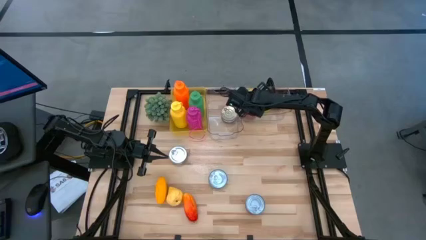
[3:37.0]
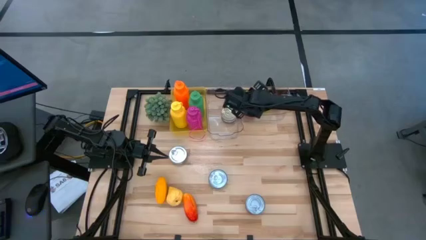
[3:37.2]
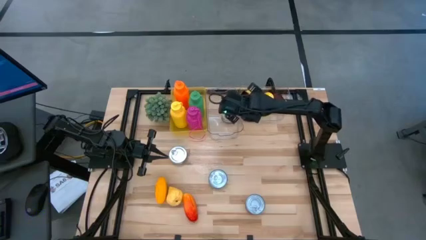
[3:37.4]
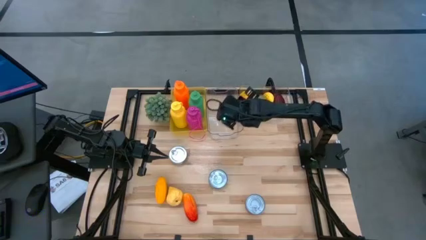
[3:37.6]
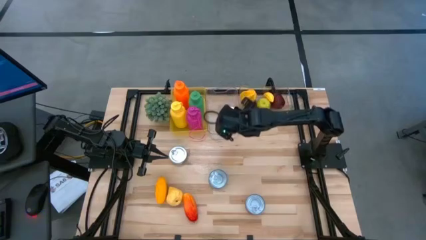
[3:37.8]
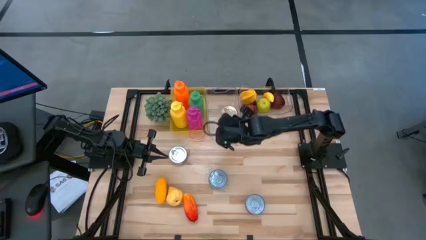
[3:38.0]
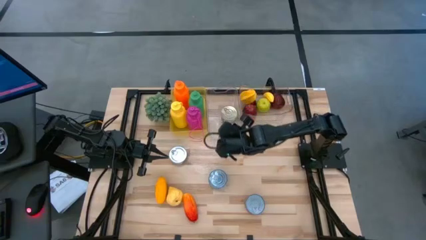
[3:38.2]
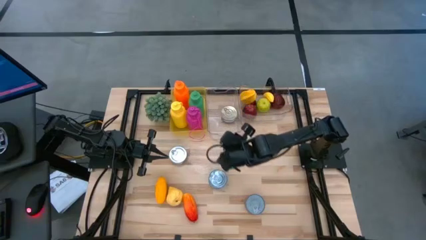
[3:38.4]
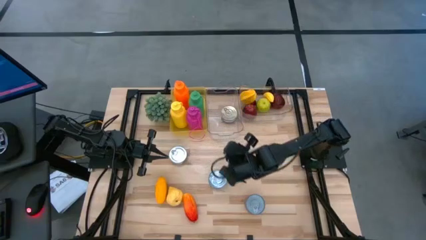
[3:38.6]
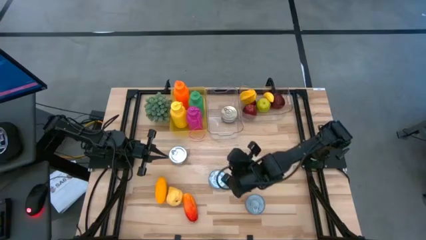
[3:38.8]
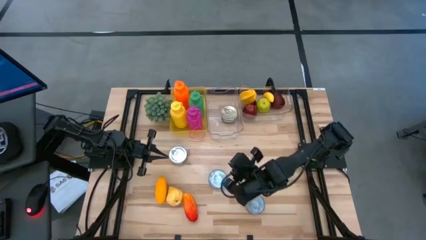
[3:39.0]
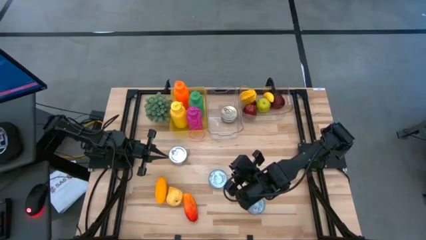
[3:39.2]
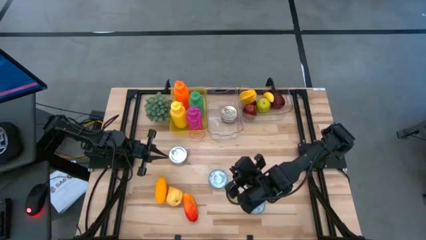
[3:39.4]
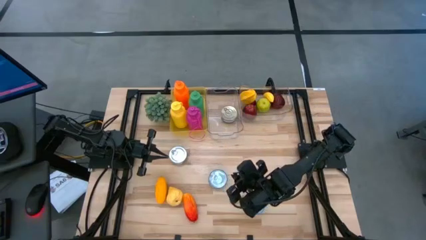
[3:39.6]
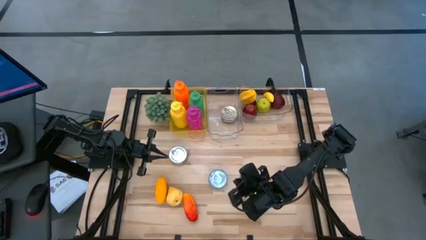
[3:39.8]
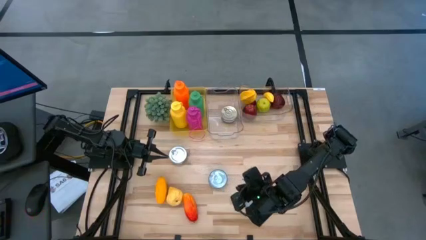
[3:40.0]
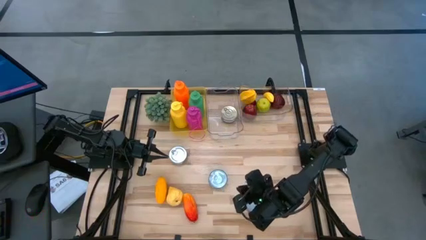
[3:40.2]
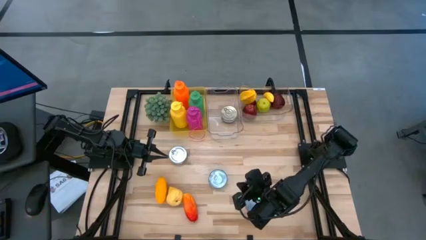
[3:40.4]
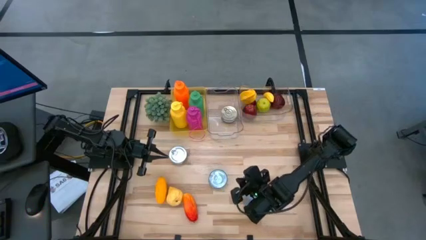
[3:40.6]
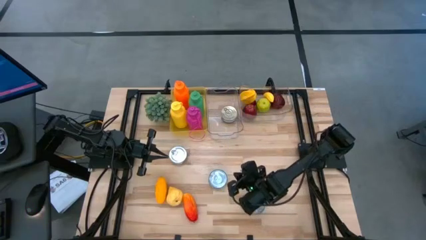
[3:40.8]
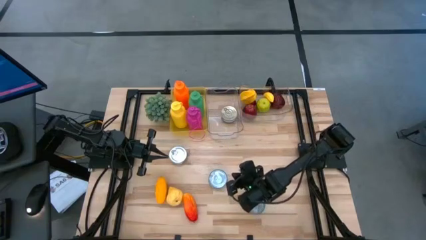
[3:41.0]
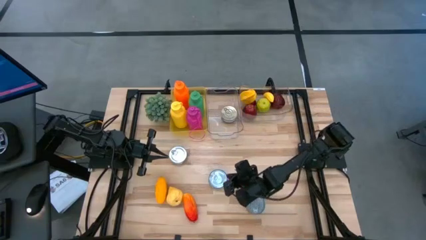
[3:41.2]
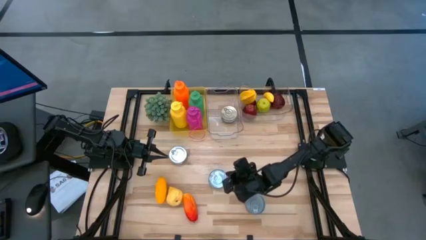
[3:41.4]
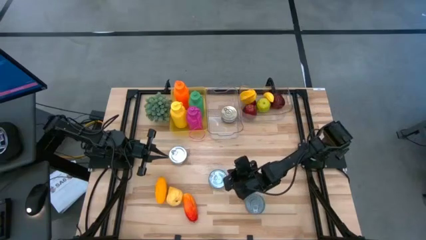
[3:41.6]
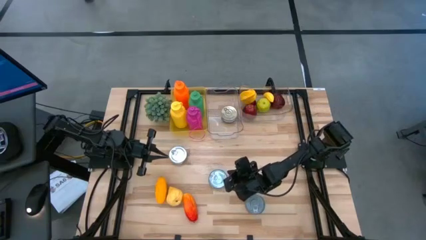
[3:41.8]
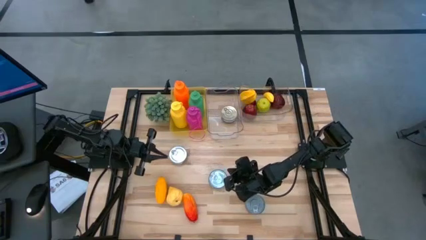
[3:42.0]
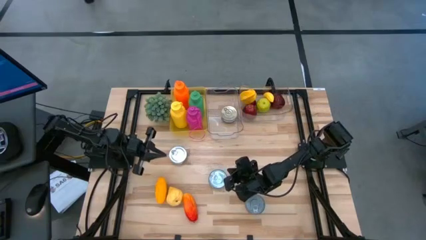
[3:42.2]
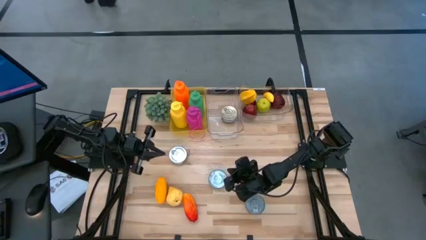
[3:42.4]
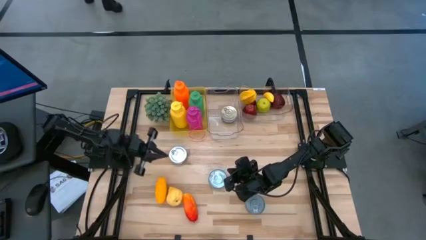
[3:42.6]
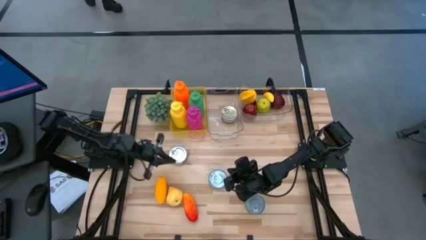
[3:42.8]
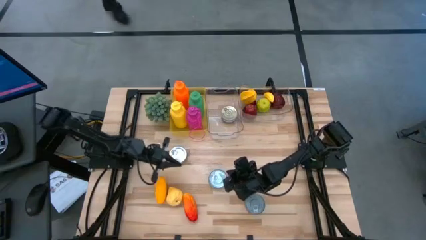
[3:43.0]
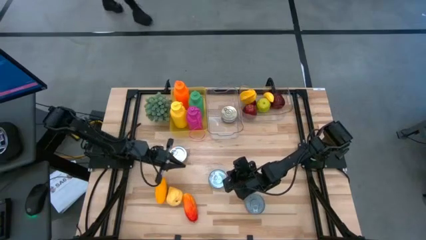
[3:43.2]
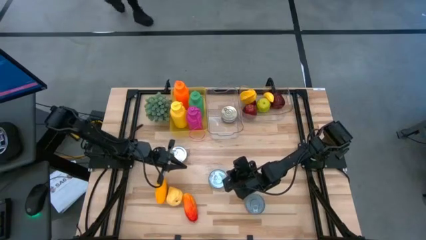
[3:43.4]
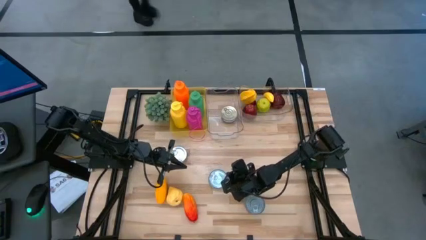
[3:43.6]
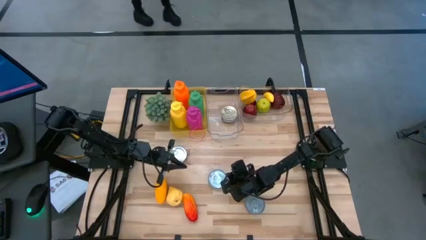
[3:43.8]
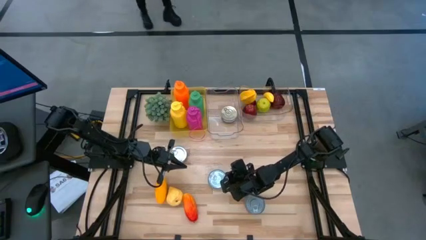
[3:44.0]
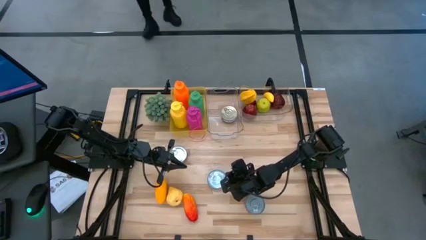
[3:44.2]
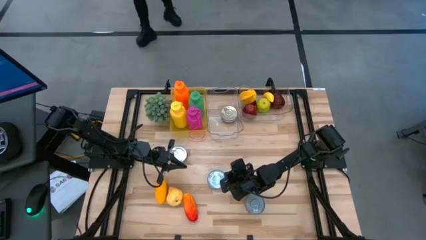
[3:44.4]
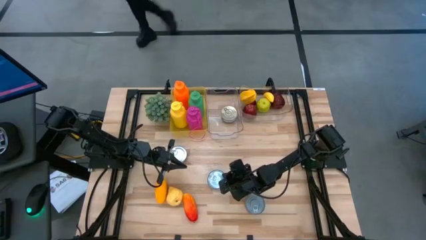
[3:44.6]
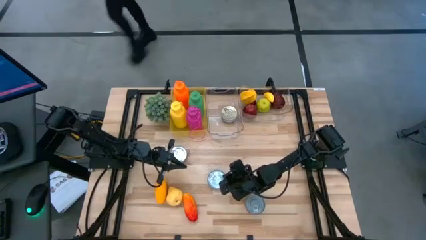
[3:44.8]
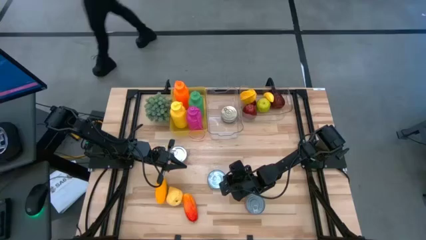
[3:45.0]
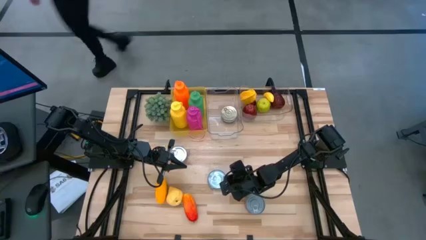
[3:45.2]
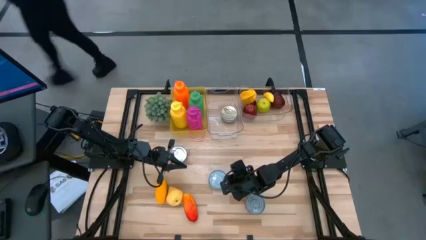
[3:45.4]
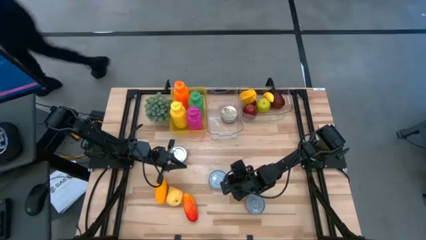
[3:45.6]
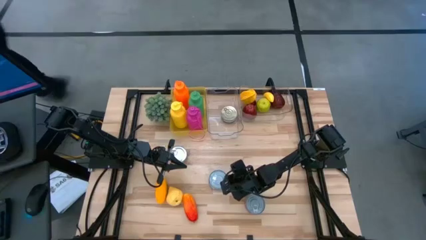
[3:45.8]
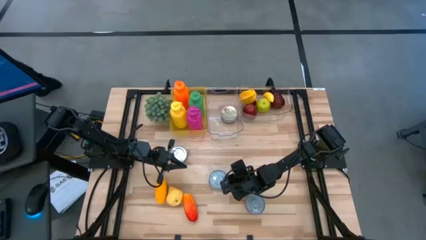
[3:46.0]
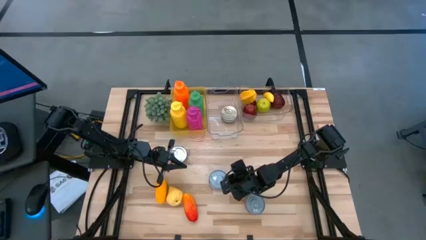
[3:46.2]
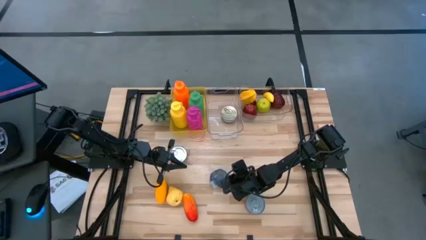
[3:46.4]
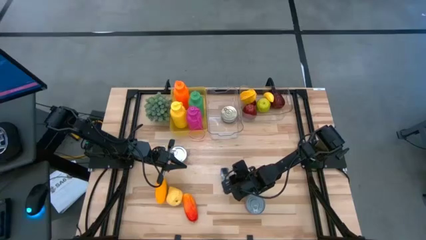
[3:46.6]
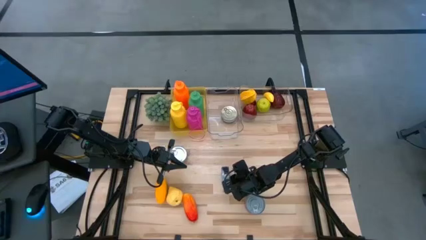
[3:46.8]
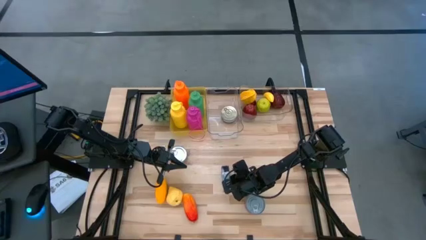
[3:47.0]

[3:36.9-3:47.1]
Task: Pick & Place Food Item
Stack the dark blue tuna on top of the blue can in the left transparent bin

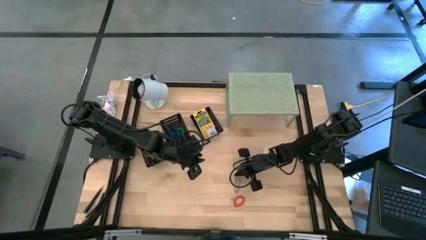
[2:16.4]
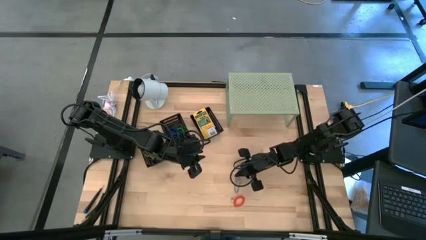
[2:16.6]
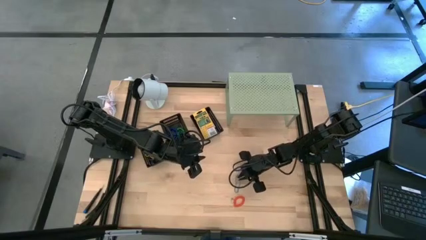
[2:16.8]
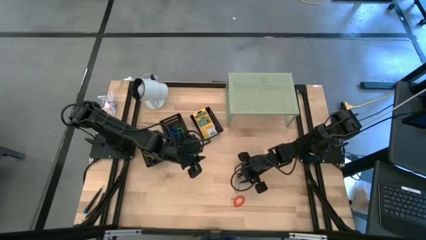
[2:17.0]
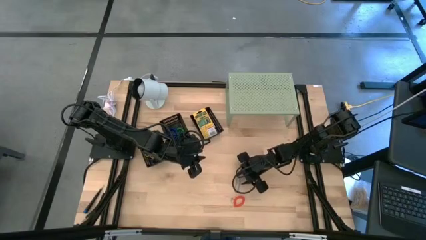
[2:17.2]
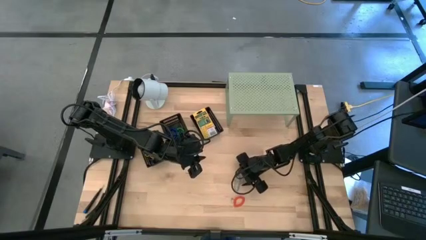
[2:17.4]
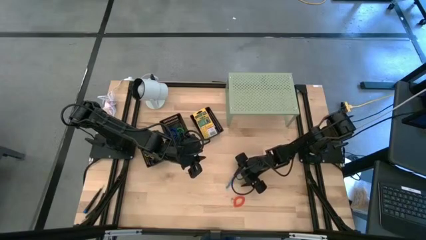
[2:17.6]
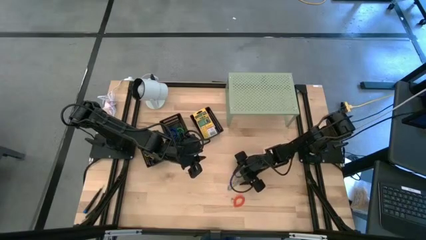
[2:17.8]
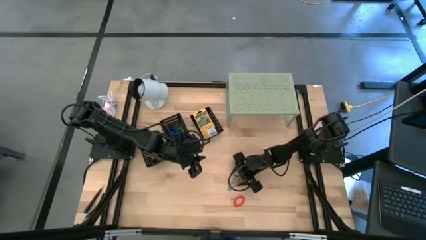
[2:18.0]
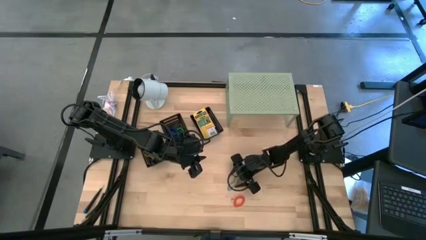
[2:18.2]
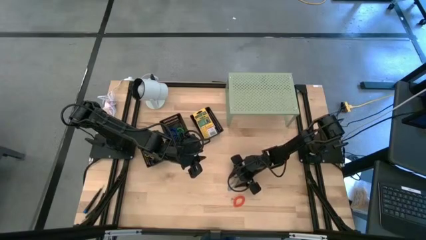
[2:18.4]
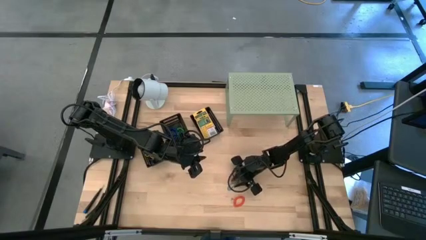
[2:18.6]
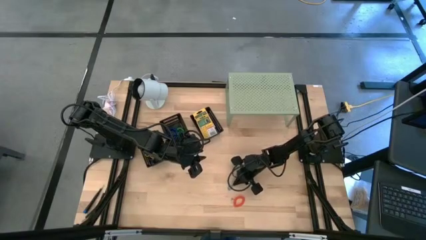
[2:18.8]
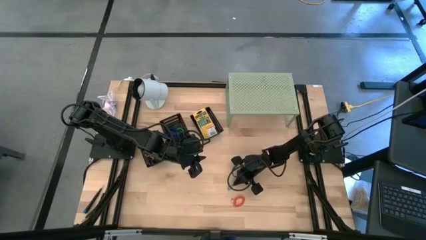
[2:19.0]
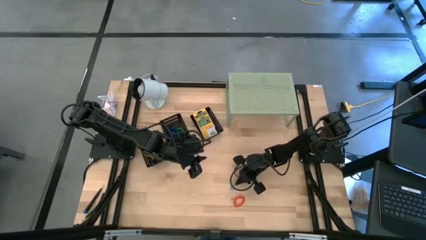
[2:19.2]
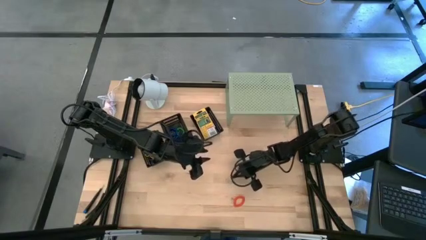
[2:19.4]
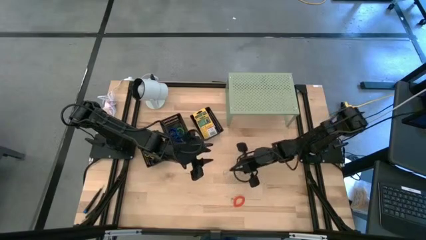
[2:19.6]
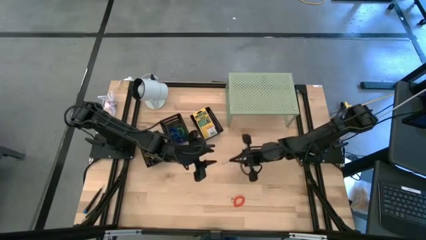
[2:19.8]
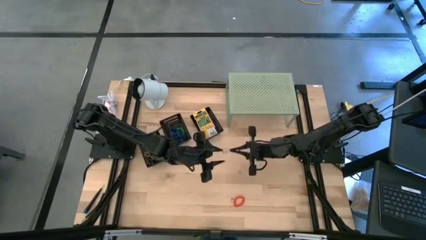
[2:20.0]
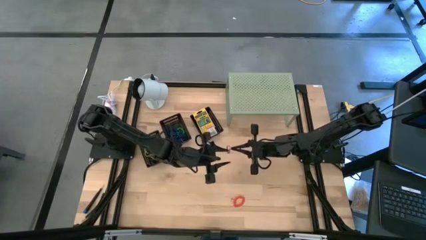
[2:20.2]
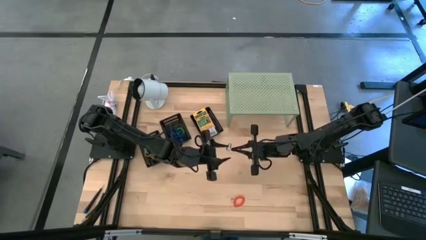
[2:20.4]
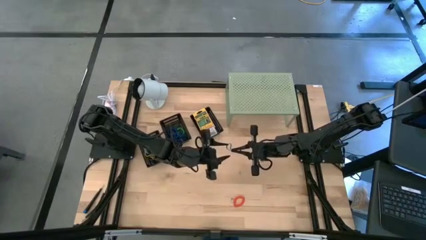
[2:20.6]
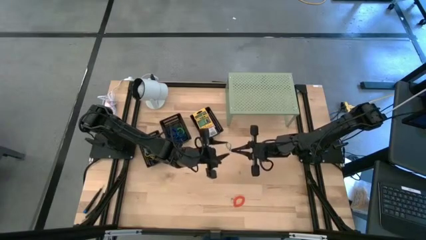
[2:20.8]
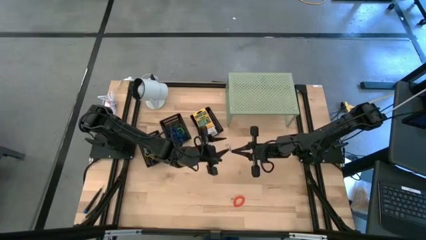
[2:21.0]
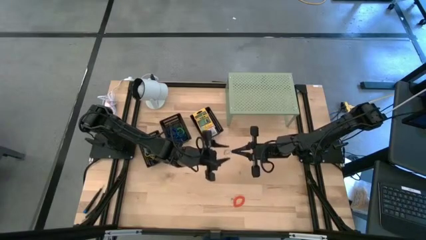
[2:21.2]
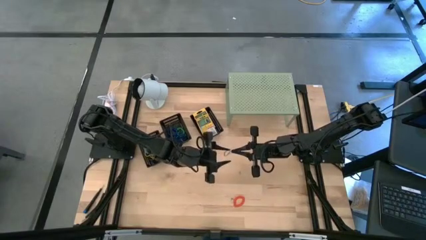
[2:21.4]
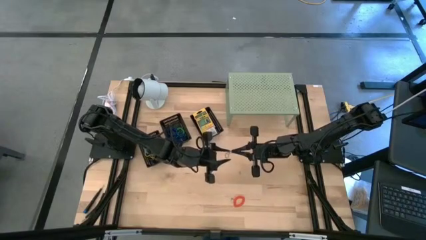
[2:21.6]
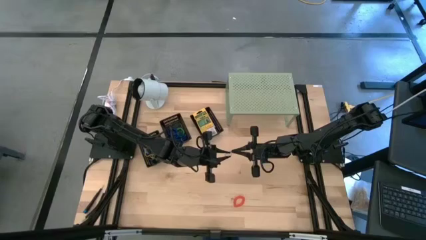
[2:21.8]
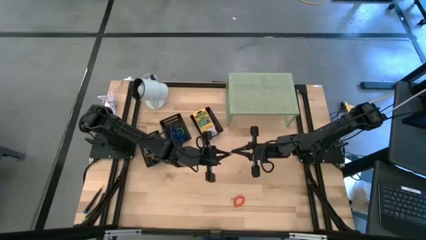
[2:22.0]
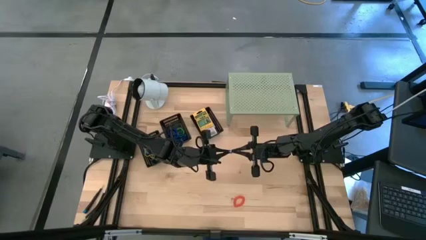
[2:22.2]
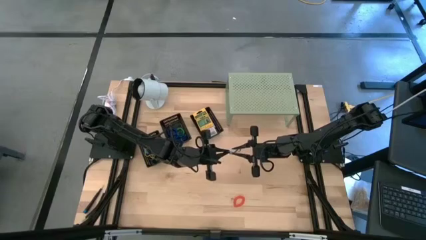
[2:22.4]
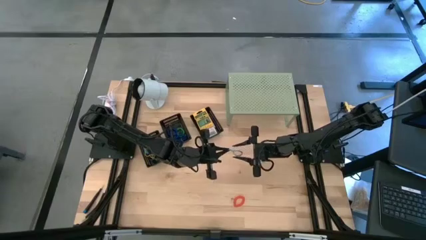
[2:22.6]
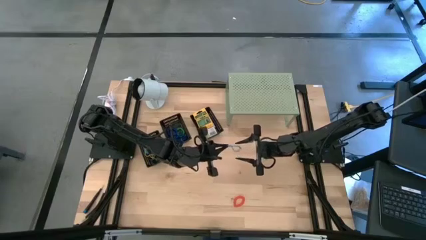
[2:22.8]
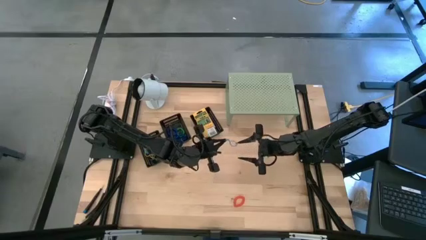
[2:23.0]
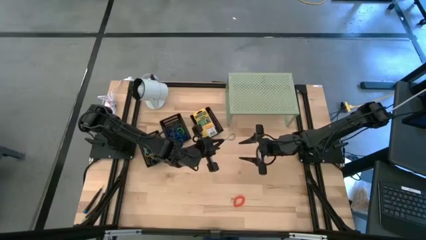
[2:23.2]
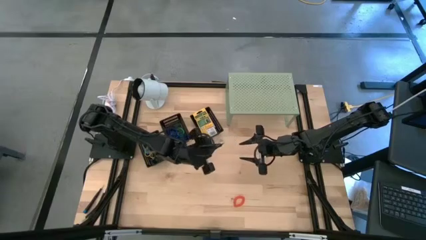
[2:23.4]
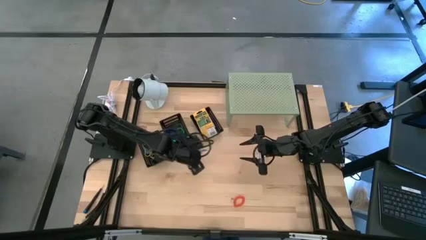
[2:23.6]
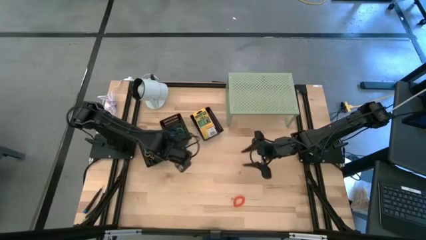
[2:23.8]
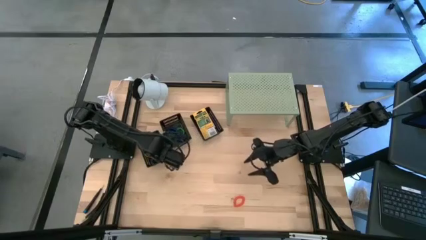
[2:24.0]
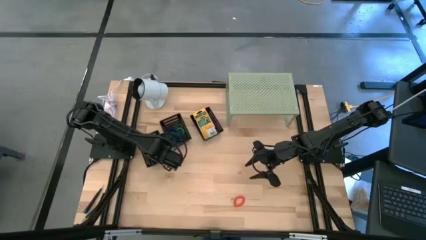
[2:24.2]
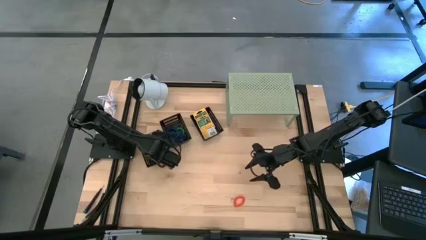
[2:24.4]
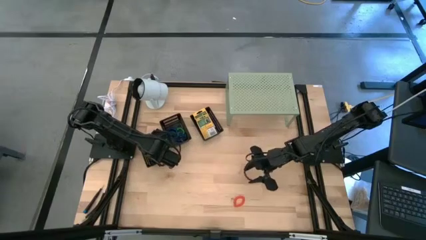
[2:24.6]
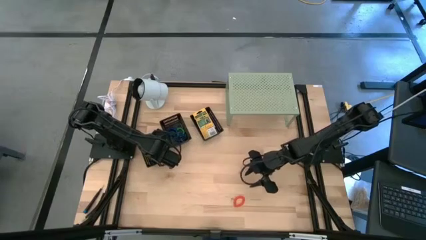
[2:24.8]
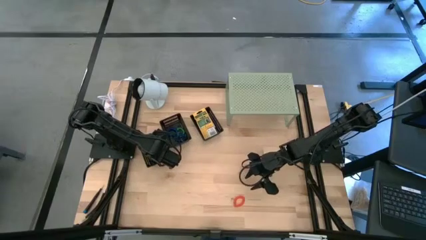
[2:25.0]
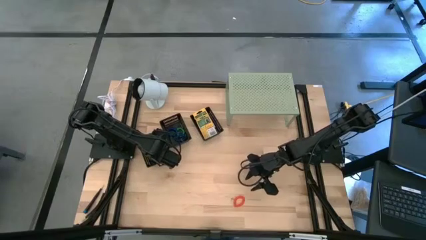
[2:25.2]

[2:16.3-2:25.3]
Task: Pick & Place Office Desk Supplies
Put the blue rubber band into the left black basket
